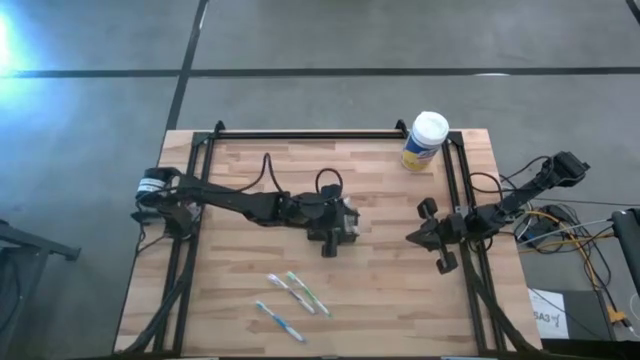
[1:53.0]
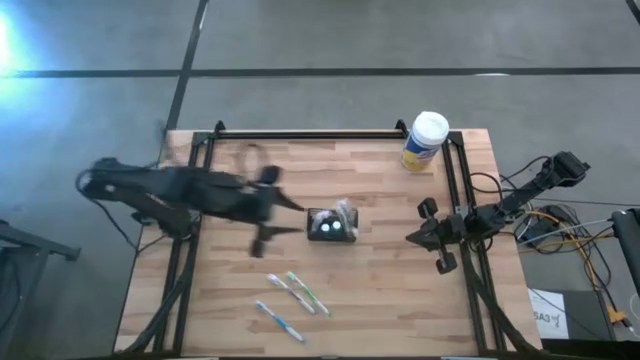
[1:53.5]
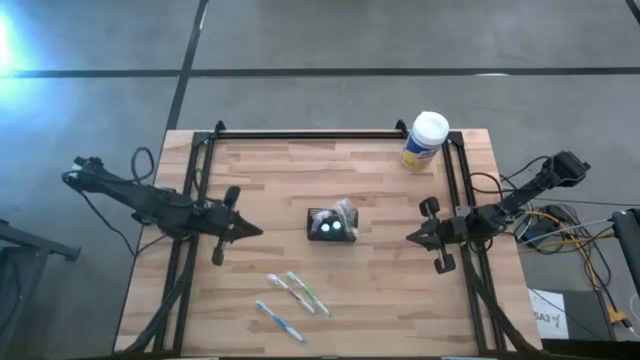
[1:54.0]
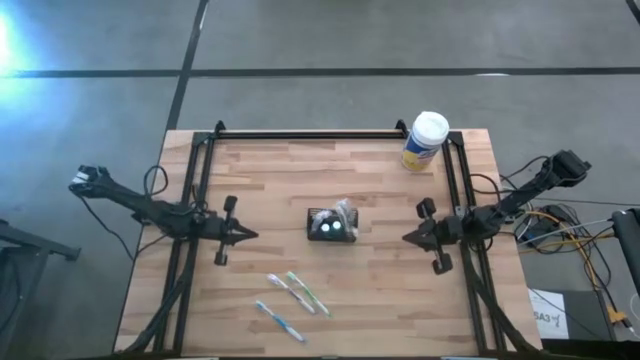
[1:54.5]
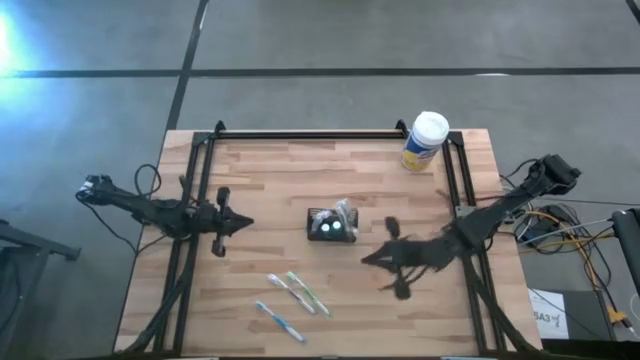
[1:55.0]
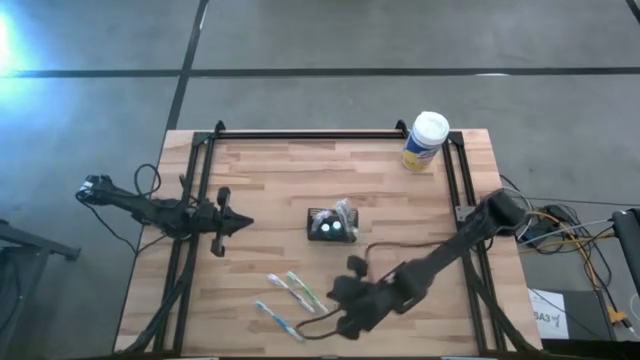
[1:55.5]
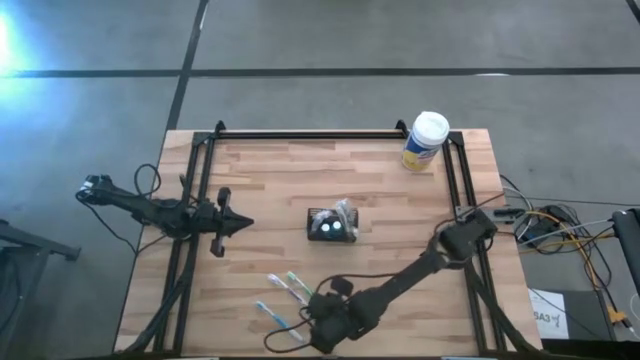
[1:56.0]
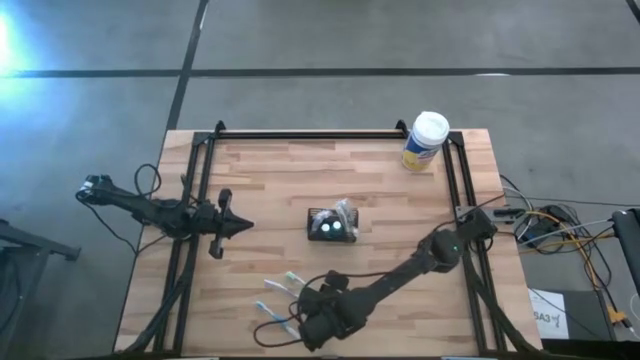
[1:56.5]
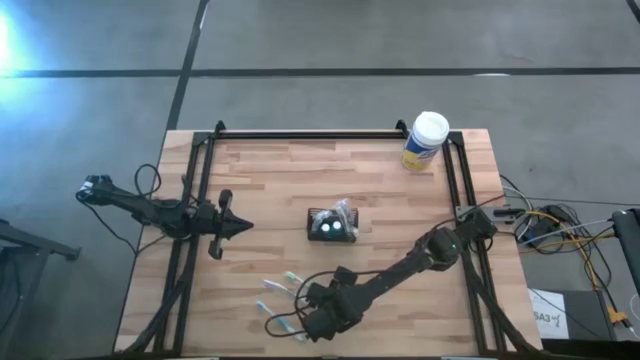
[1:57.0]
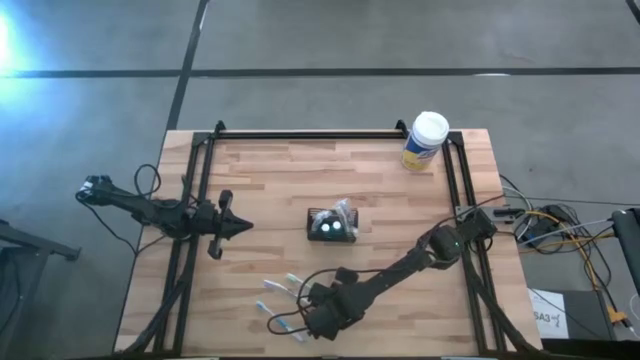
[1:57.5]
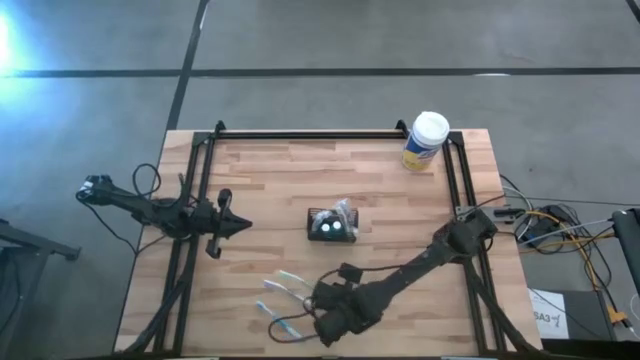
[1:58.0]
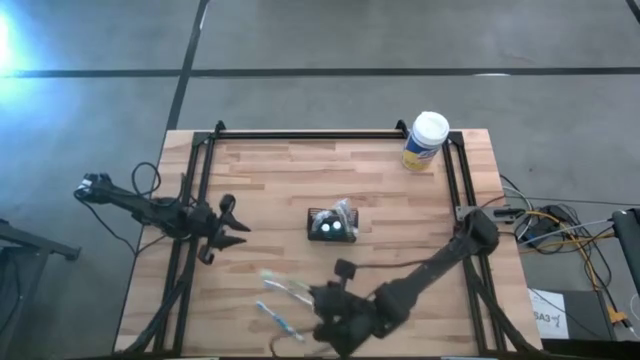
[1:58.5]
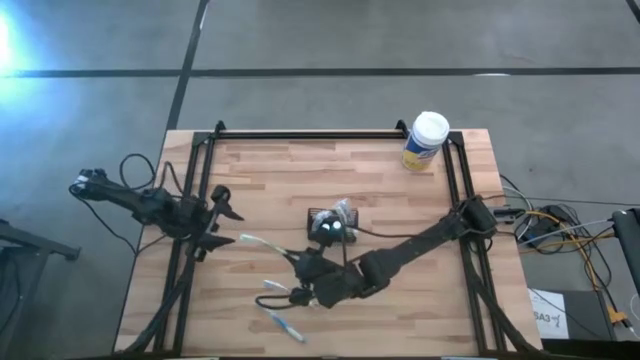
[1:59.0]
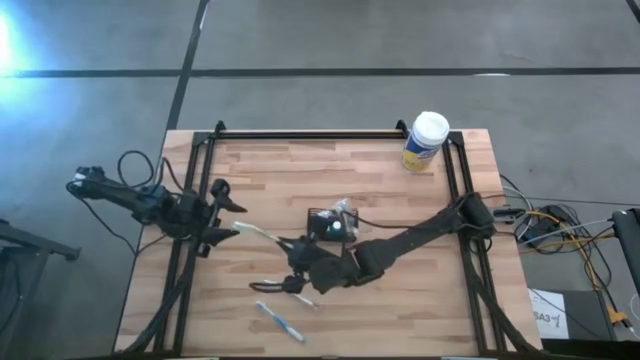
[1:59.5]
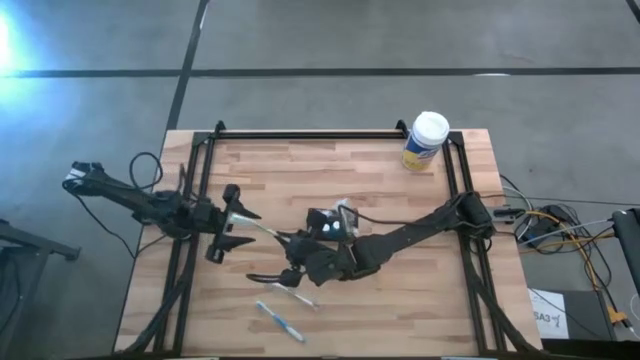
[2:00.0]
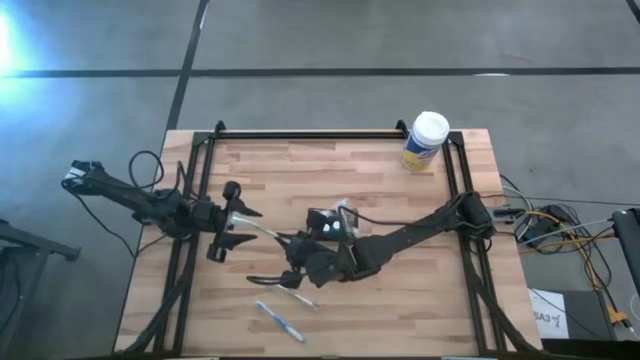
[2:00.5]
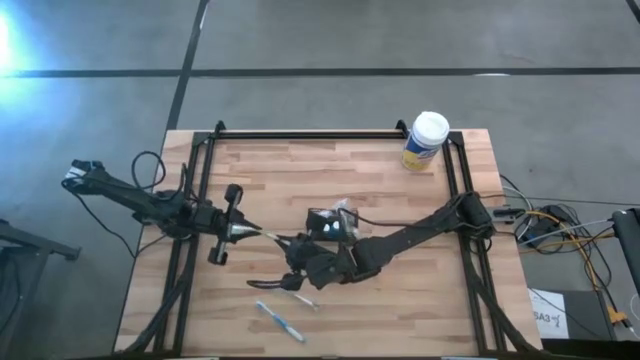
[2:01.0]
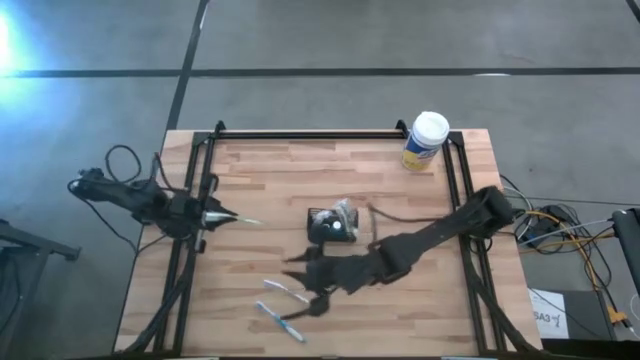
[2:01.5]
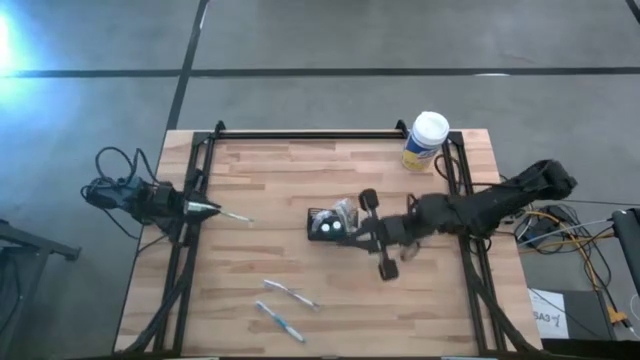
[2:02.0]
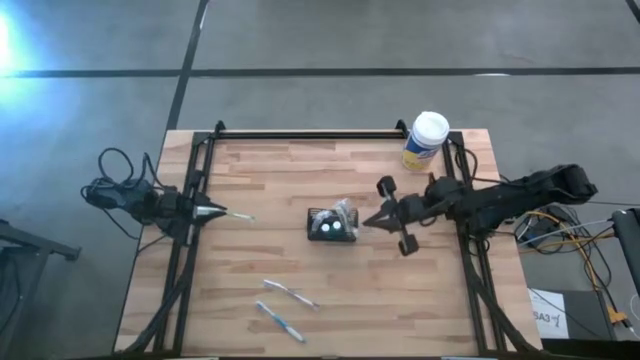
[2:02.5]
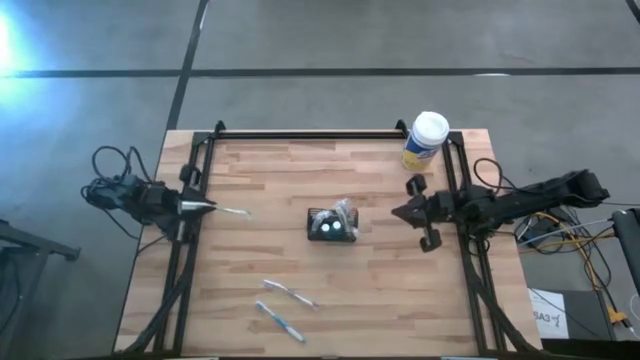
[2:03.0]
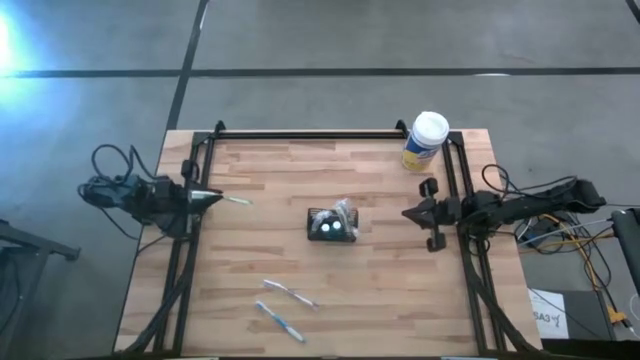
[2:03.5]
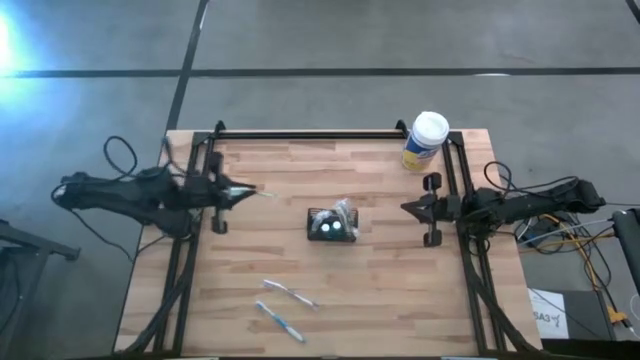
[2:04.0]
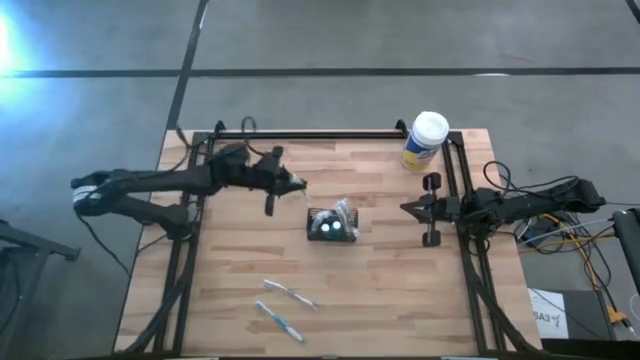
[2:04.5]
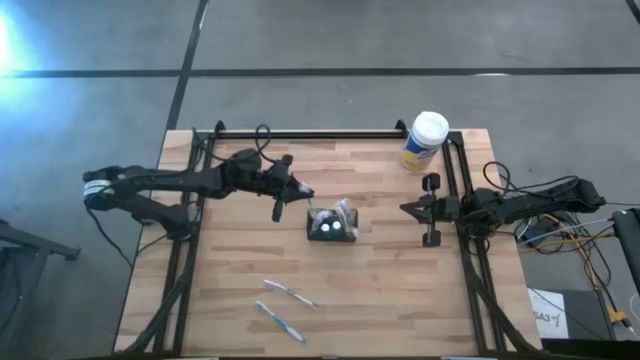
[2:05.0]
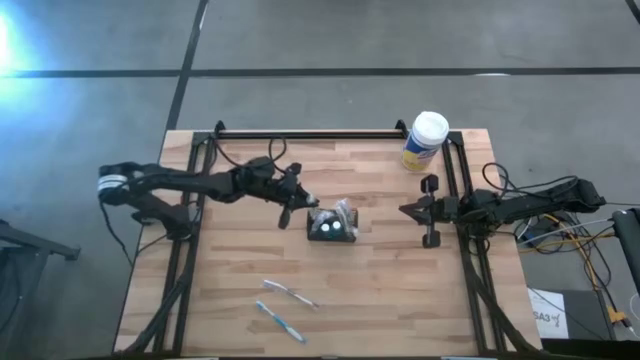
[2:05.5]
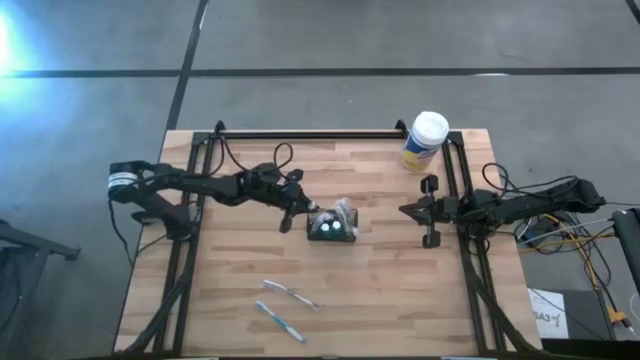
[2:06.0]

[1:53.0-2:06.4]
Task: Pick & Place toothbrushing station
Put the green toothbrush into the black wire organizer

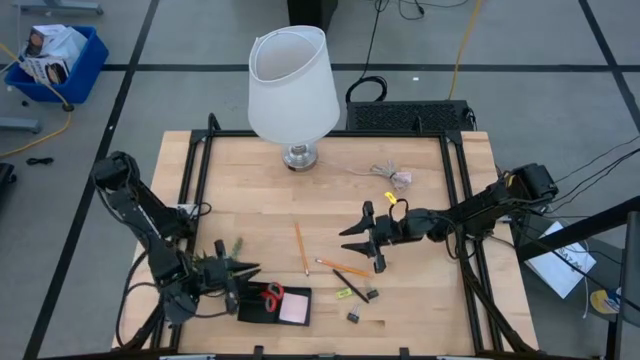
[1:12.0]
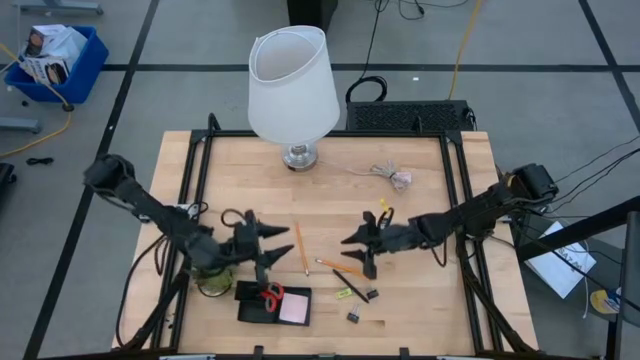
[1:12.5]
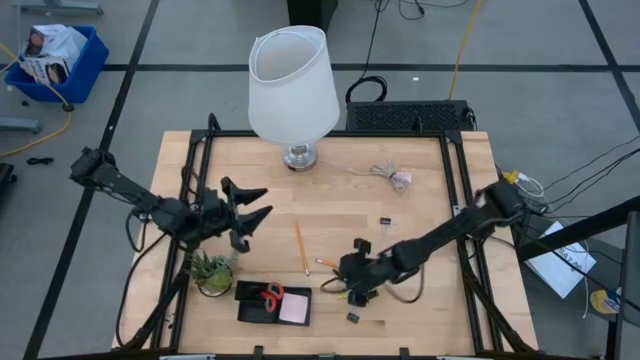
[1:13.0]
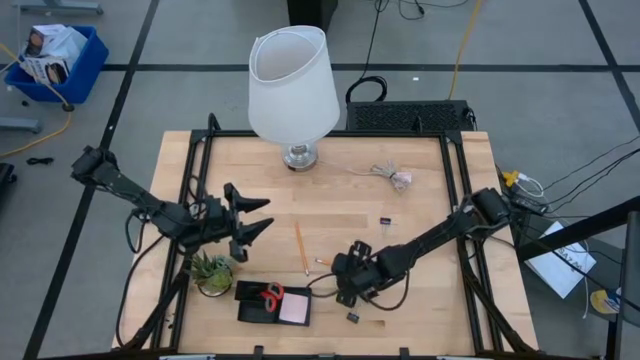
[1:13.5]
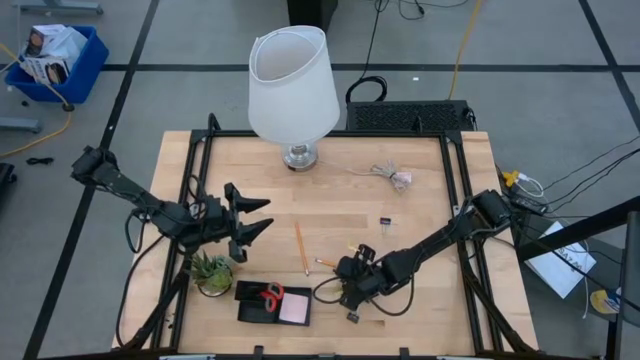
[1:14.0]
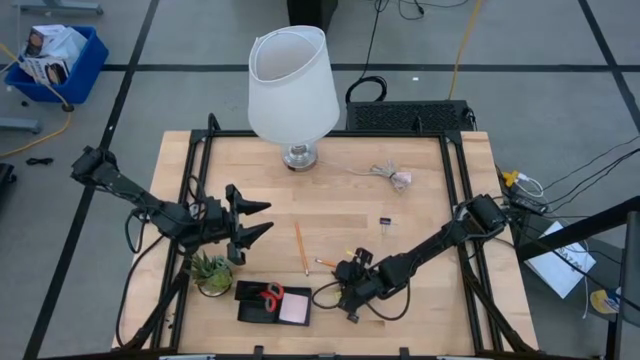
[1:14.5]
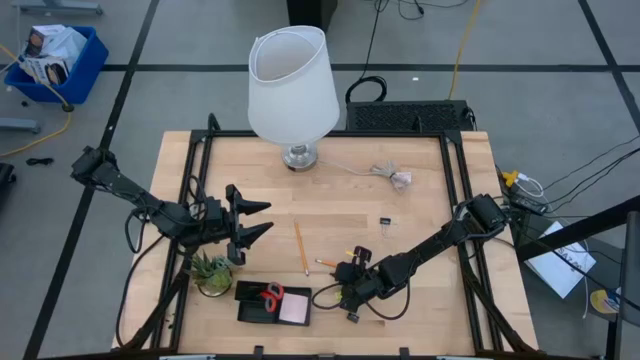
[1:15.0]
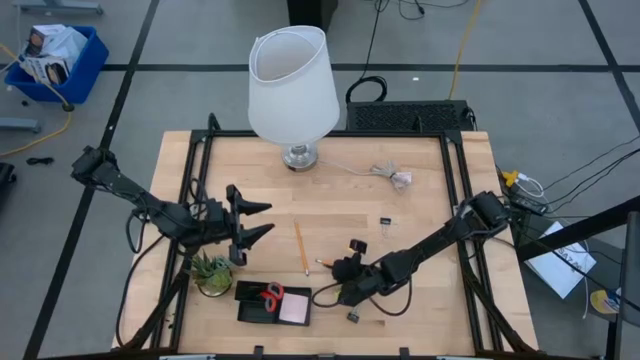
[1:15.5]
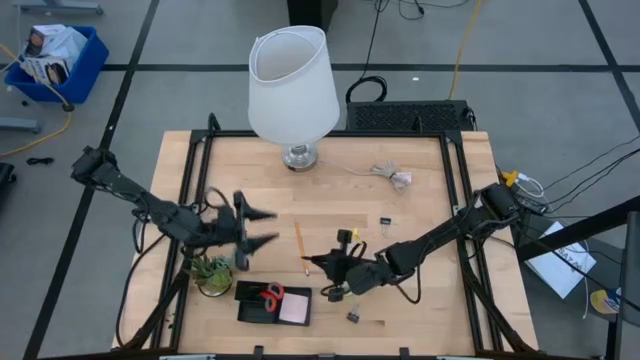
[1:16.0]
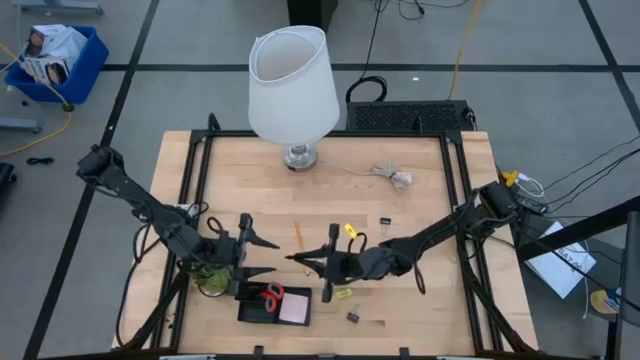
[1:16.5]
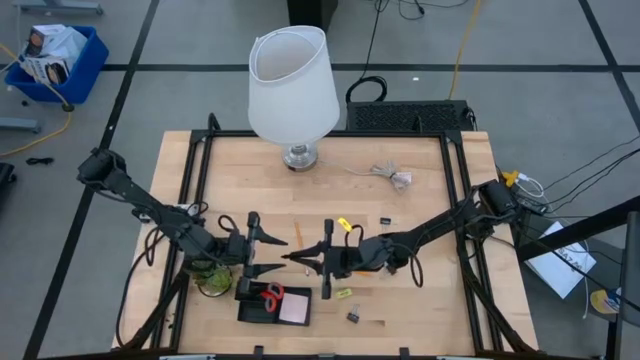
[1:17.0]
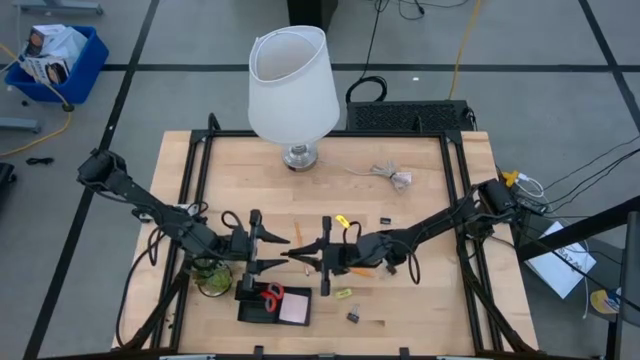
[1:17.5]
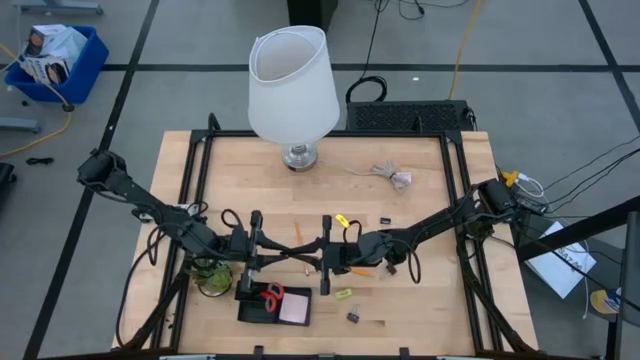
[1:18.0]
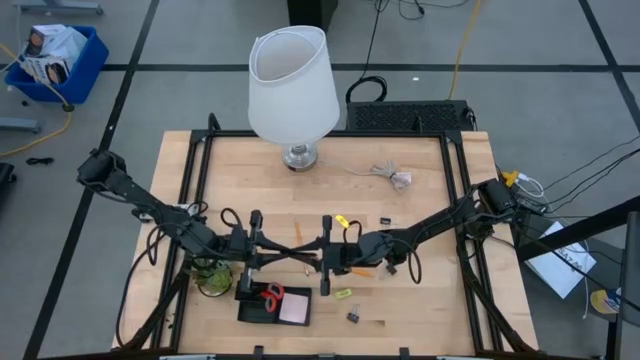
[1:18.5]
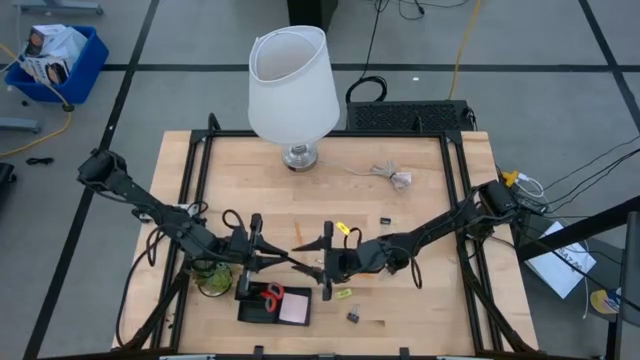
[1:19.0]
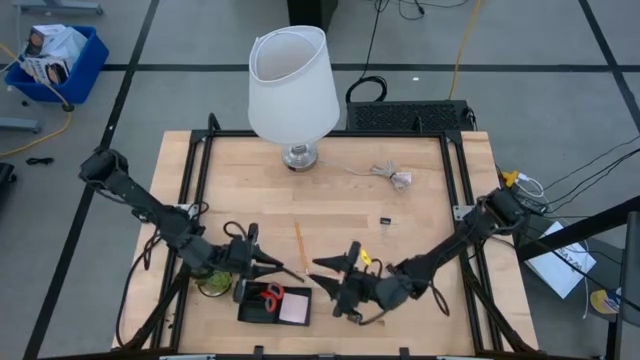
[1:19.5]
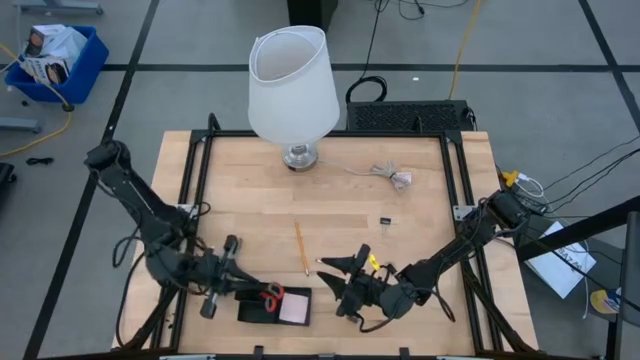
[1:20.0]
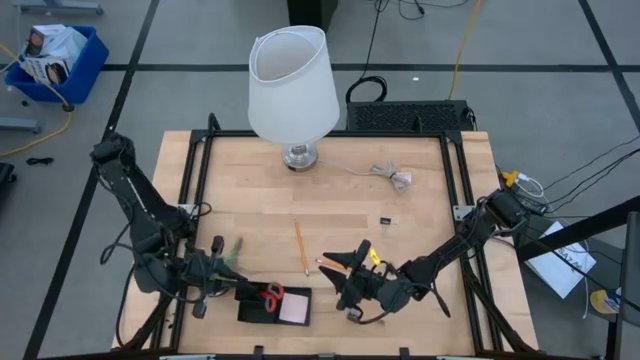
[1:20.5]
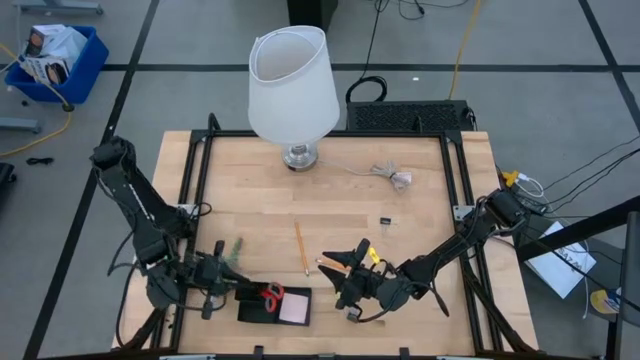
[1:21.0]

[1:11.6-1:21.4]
Task: Pick and place office supplies into organizer
Put the black pen into the black desk organizer
